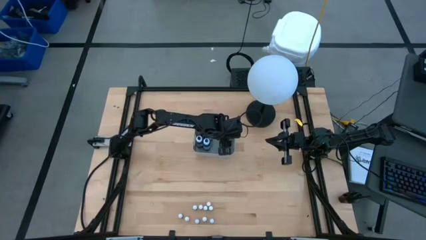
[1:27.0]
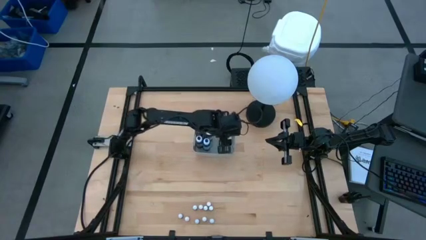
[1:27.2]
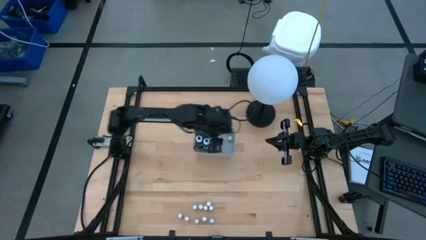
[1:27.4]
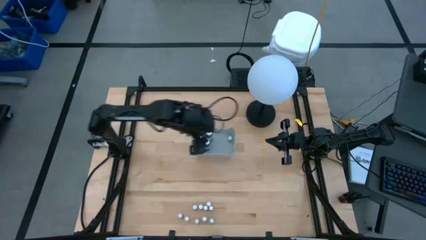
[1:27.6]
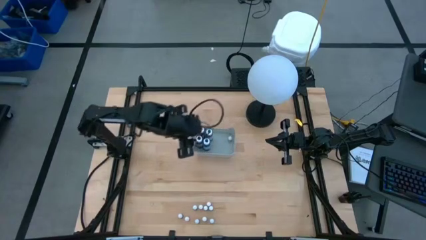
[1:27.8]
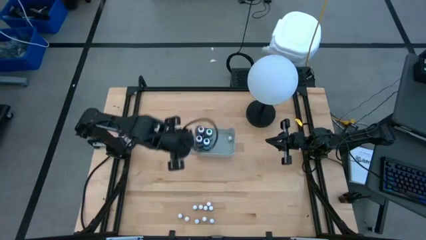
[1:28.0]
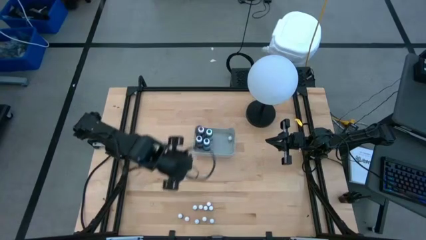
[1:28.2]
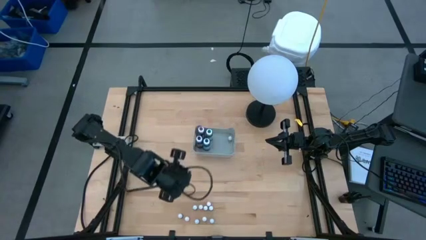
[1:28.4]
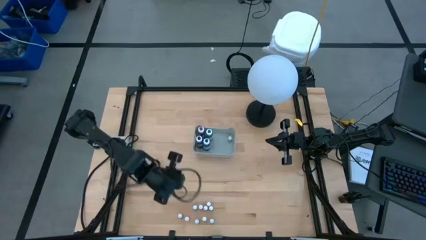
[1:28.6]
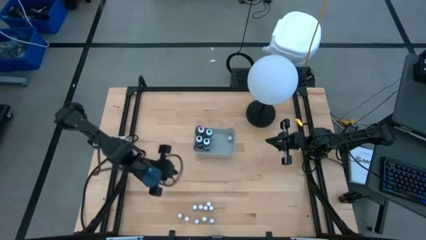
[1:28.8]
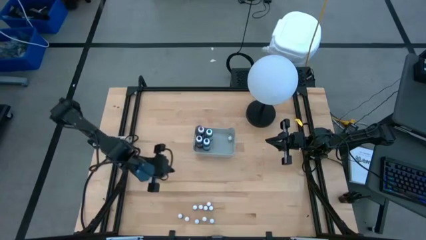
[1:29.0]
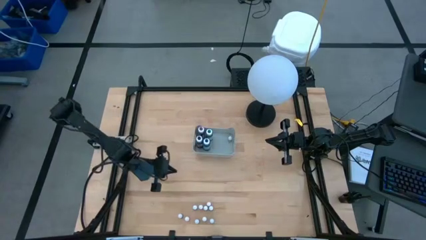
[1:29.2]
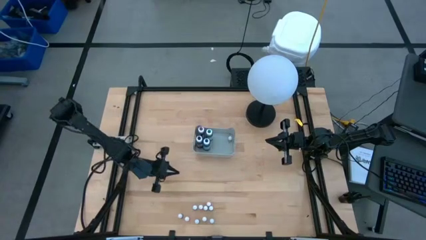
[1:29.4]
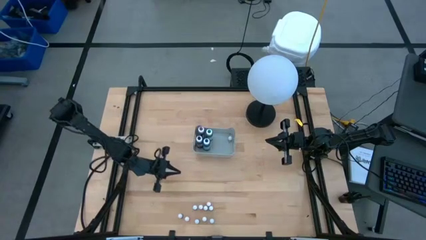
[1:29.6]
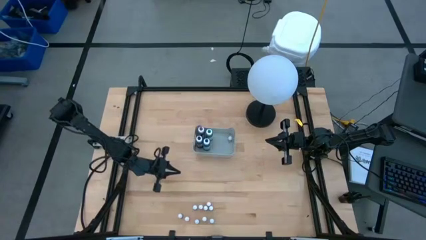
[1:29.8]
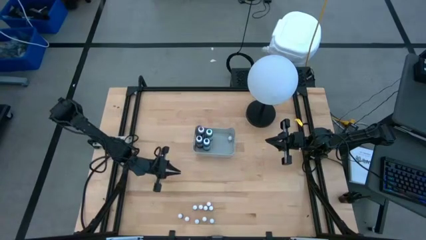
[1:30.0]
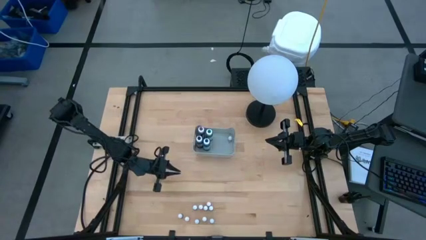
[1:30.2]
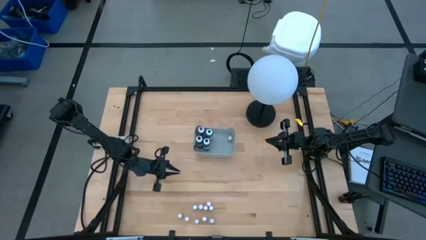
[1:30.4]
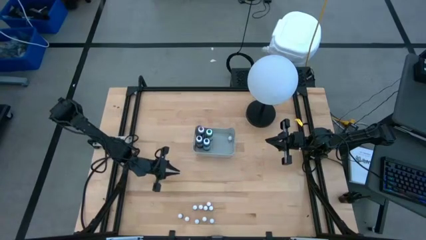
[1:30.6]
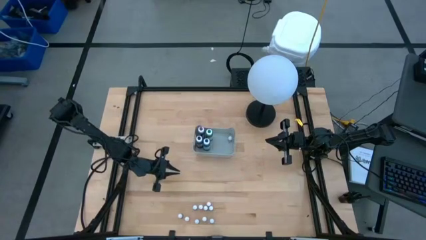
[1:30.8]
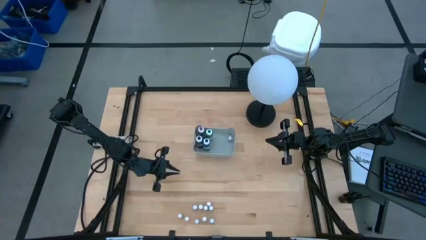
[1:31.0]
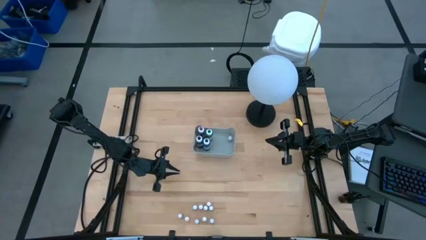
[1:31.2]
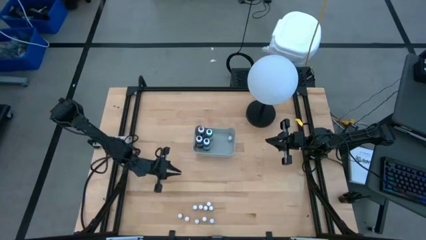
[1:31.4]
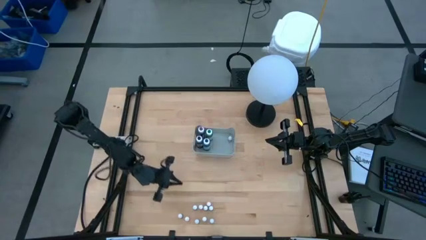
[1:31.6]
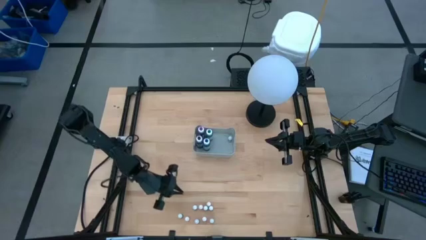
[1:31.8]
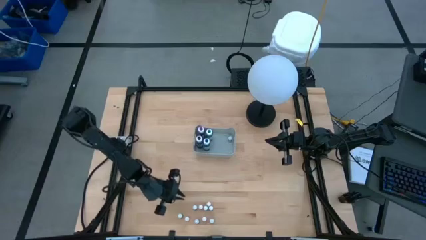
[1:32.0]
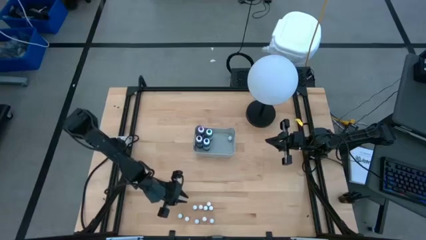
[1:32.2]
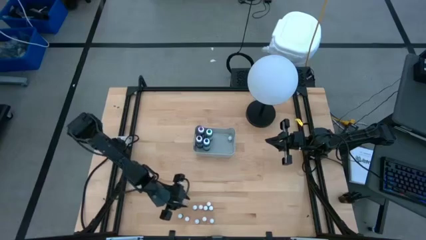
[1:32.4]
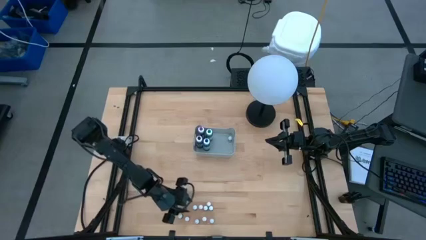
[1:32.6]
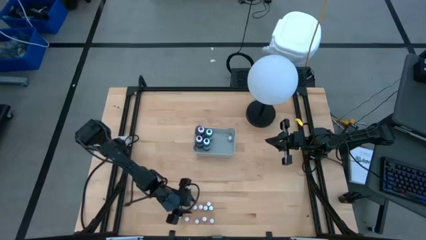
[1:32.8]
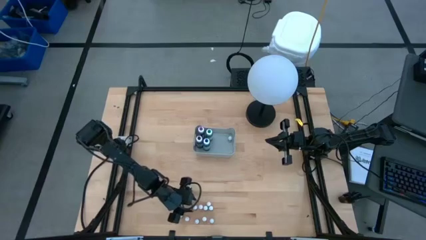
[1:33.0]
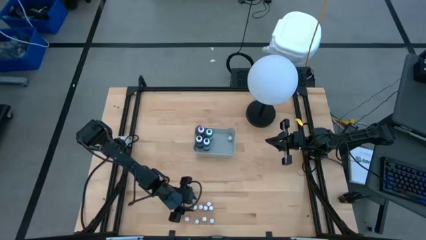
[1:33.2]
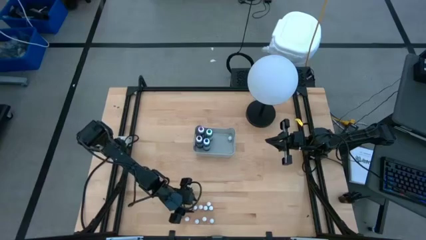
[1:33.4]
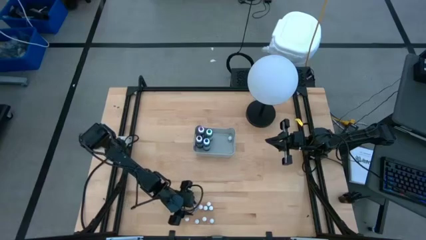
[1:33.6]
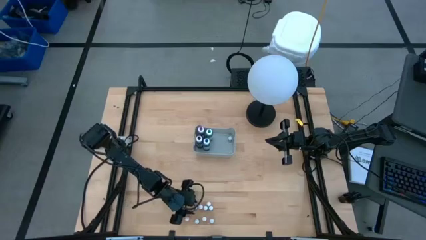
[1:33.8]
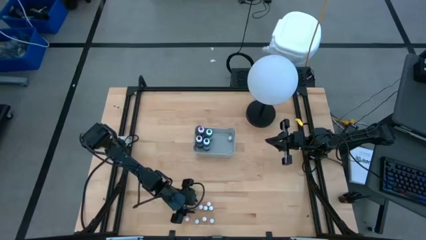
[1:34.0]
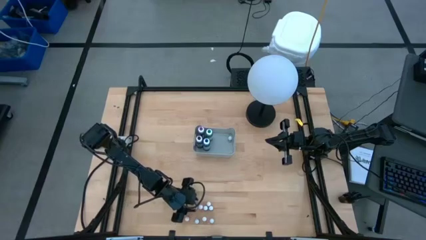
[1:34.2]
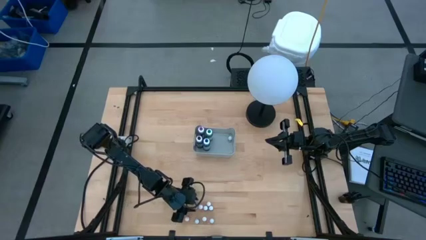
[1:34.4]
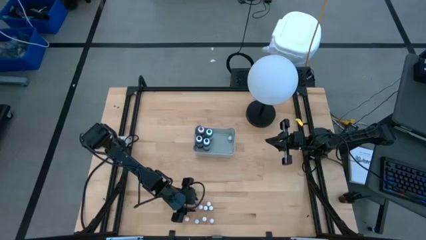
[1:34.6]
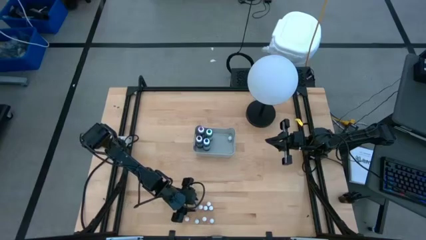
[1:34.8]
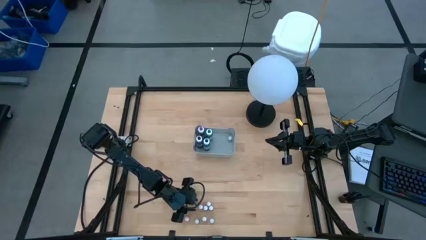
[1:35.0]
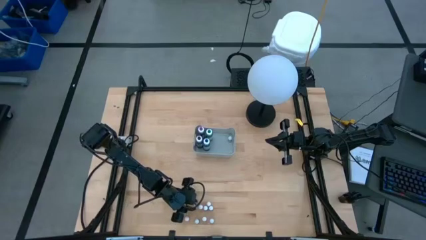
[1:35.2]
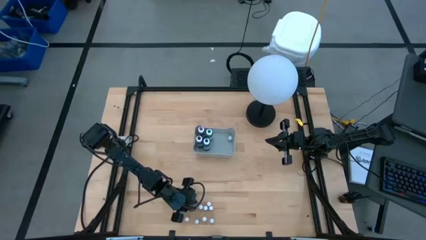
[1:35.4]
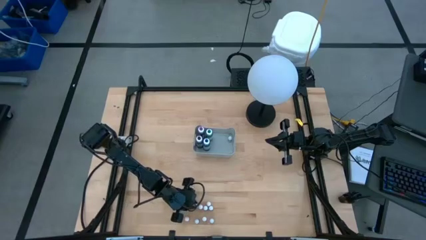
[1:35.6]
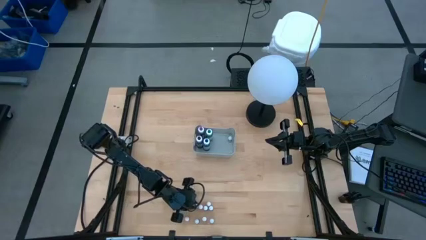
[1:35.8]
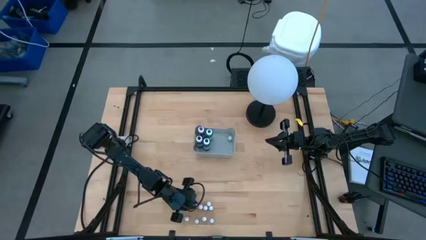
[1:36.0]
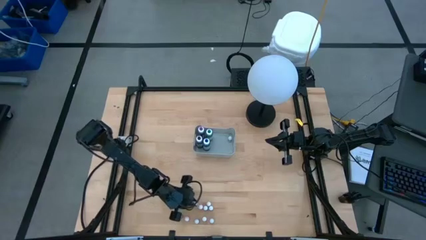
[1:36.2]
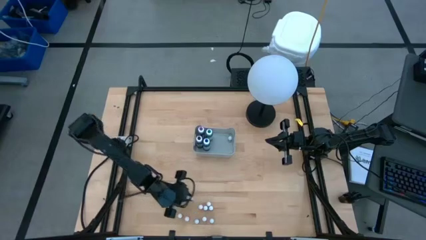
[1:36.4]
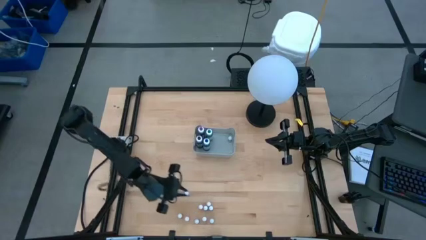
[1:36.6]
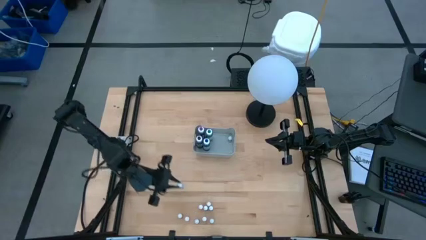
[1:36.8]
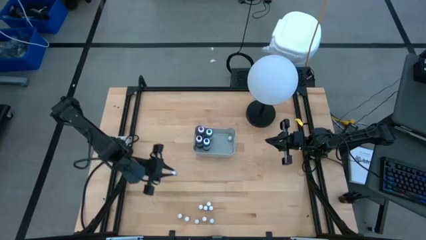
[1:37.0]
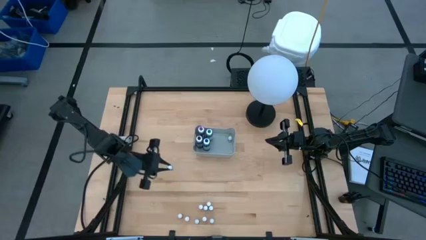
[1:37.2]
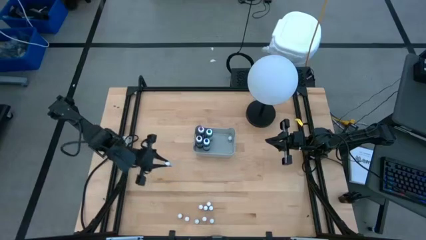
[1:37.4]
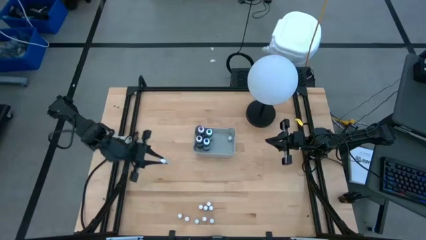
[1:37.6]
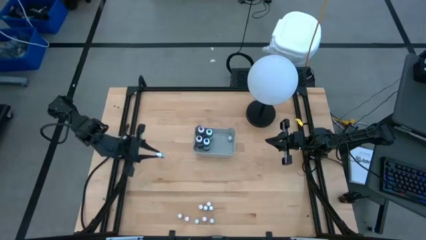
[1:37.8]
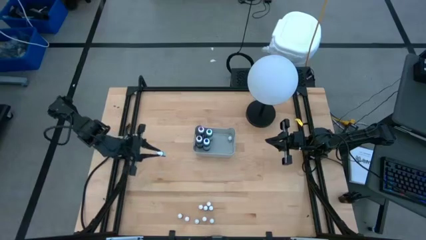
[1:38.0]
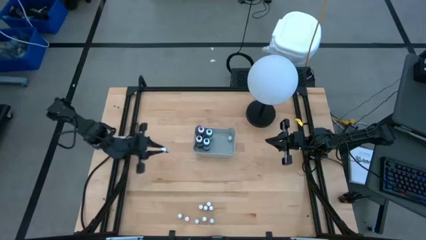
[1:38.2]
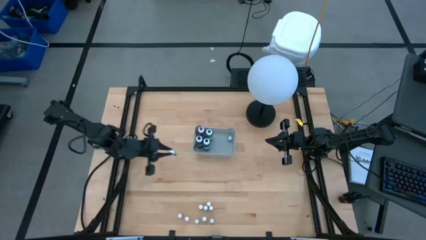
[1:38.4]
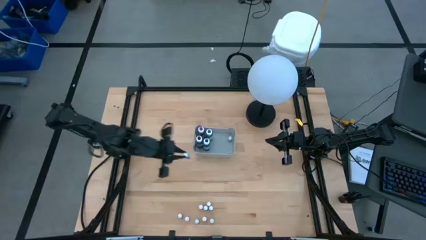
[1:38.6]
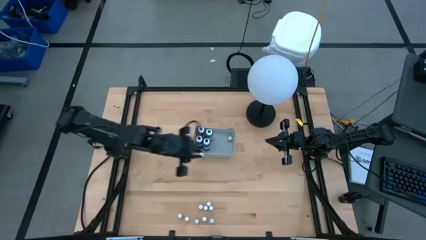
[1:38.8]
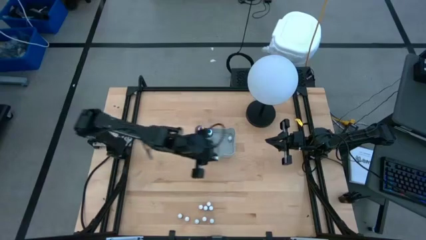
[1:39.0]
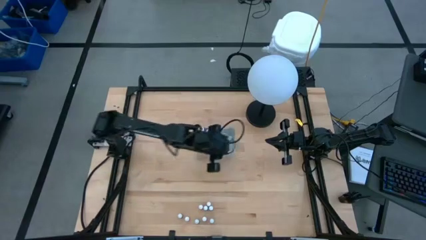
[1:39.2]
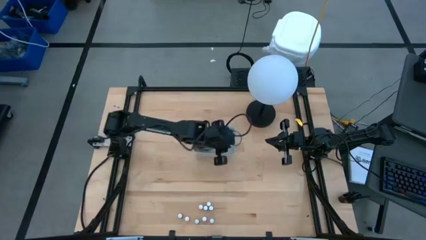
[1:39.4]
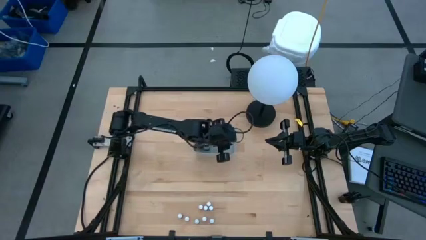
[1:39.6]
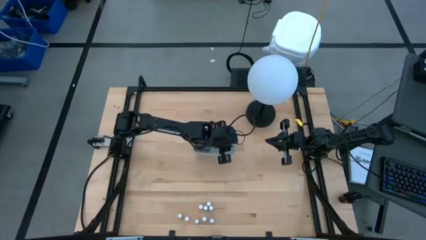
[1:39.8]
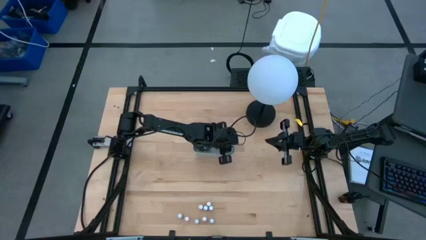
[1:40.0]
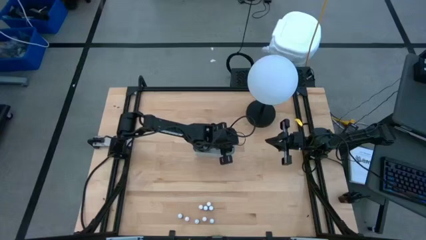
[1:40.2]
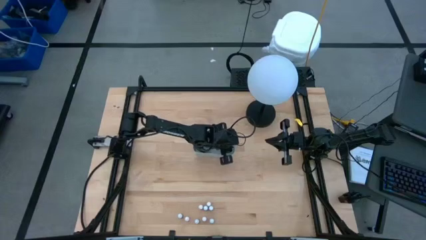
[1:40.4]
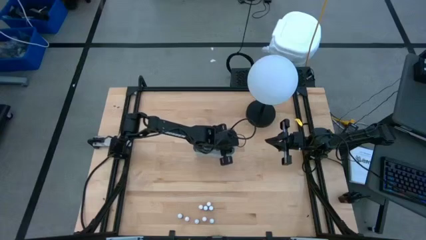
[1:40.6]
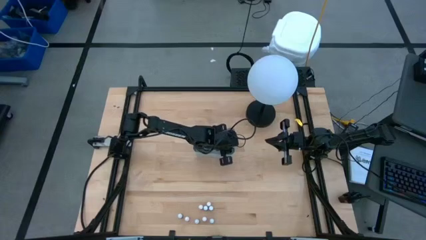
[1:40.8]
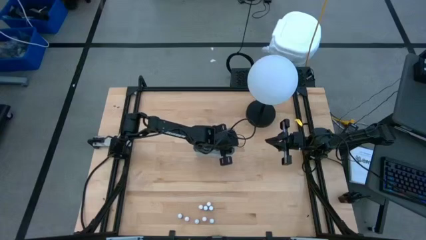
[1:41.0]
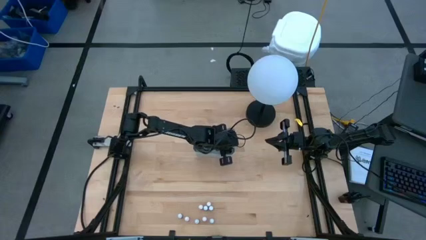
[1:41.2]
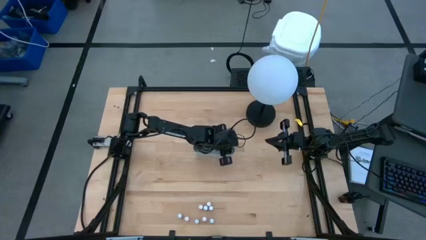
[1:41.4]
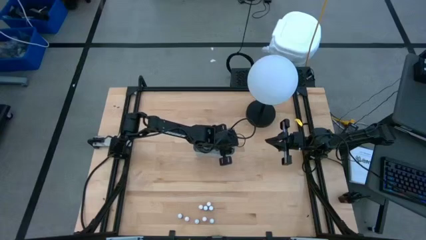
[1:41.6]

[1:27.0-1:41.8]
Task: Pick & Place food coloring
Put the small purple food coloring bottle into the gray bin

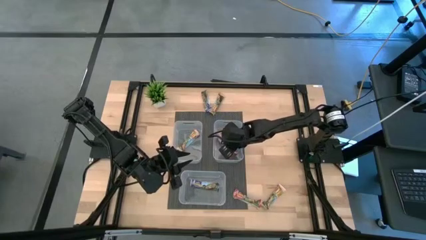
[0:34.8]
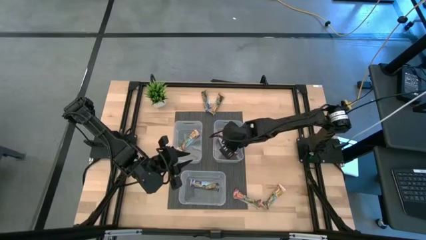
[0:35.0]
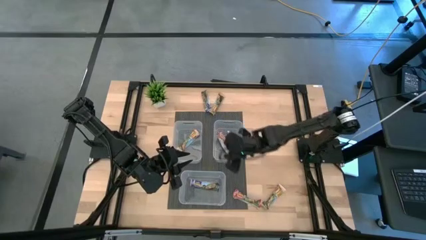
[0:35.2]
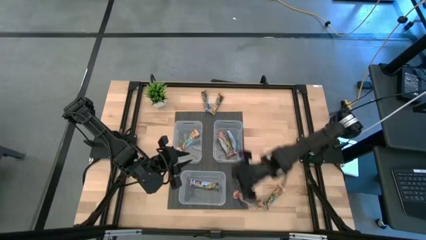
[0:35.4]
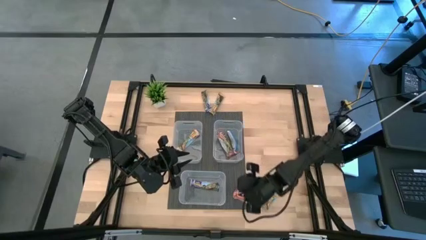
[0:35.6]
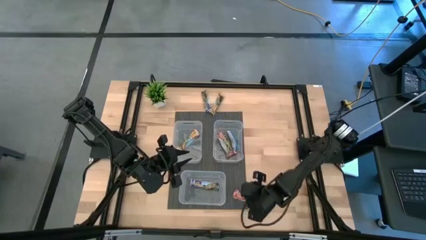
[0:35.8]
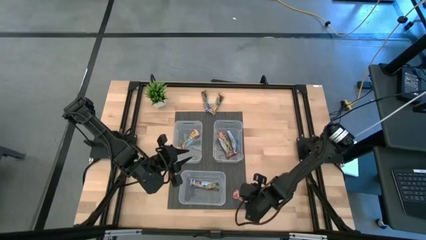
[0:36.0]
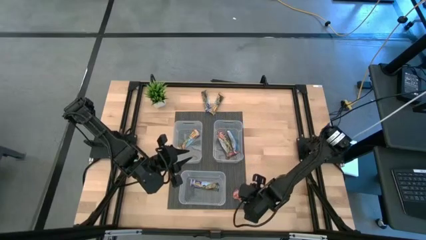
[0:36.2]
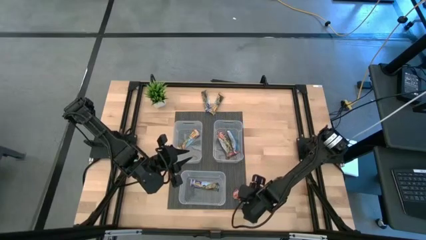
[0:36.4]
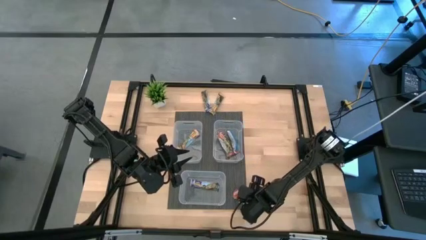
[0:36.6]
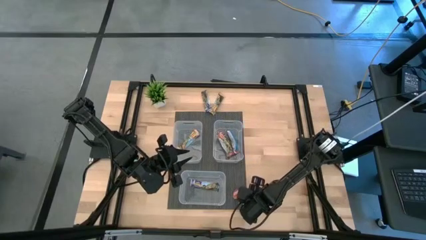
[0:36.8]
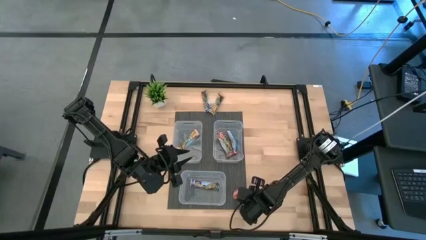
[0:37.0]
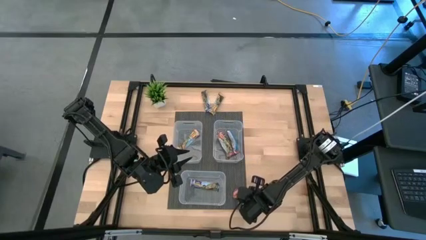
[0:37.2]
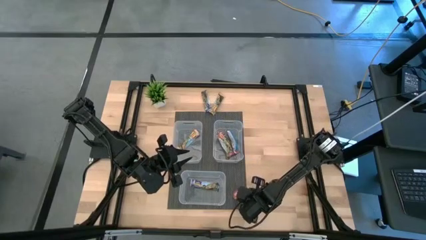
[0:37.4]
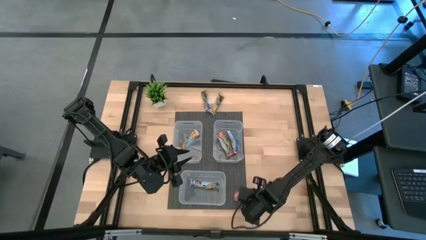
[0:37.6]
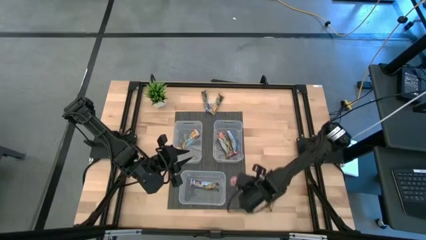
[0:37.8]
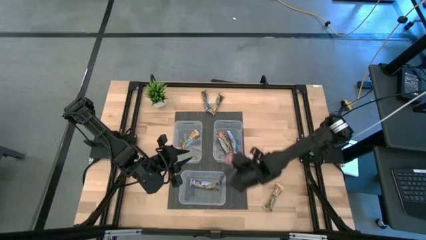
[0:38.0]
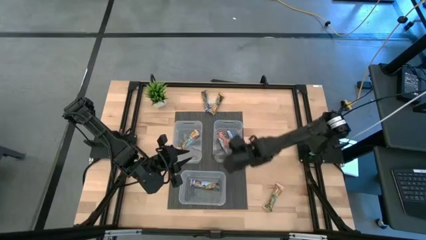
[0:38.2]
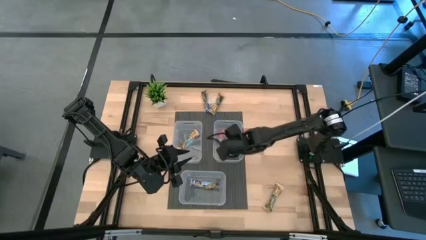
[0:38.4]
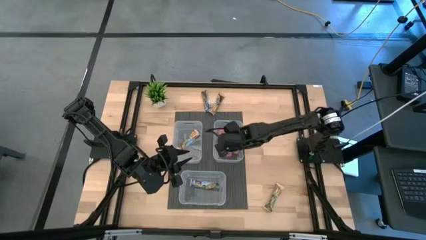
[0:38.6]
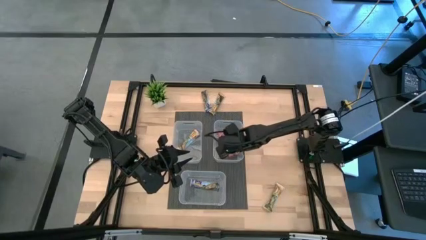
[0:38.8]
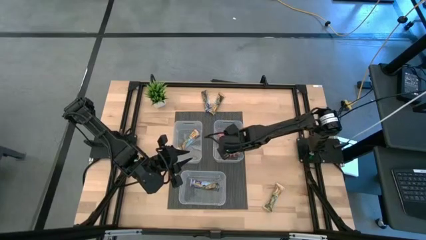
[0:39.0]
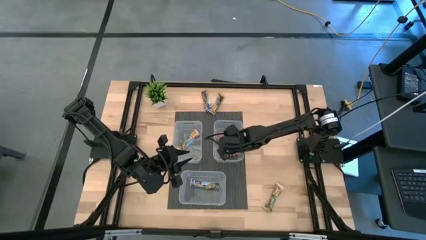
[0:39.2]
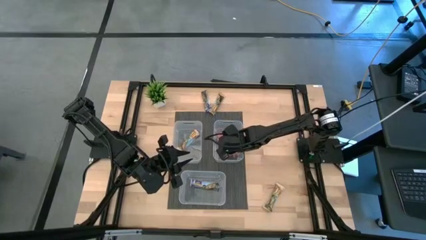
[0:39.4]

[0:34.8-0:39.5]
Task: Pick and place Granola Bars by type
Put the red granola bar into the top right transparent bin
